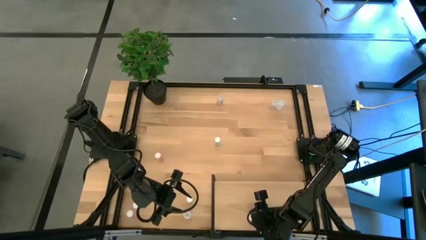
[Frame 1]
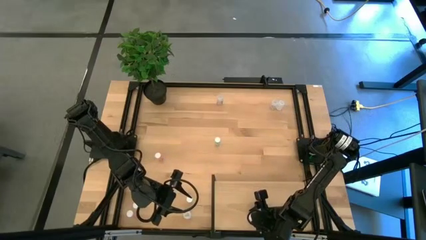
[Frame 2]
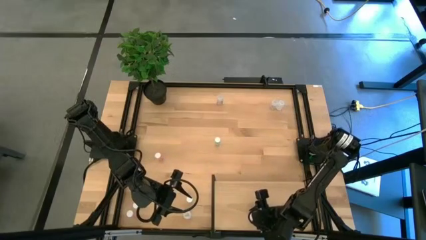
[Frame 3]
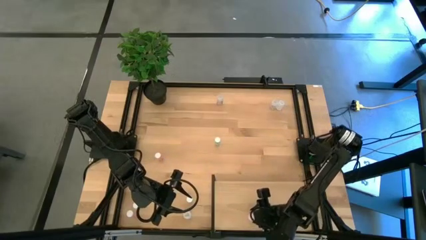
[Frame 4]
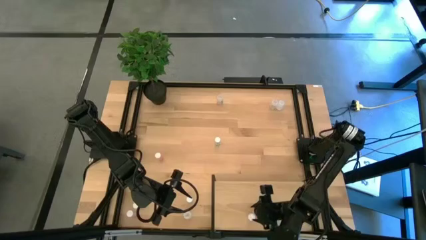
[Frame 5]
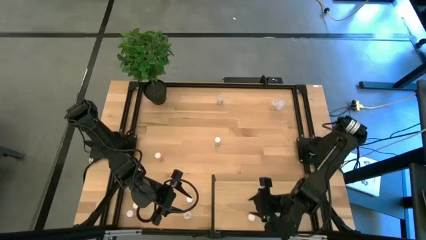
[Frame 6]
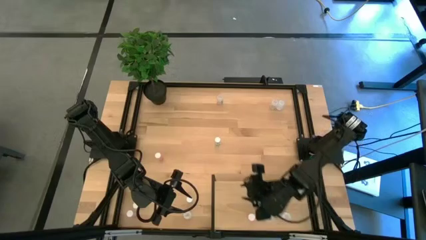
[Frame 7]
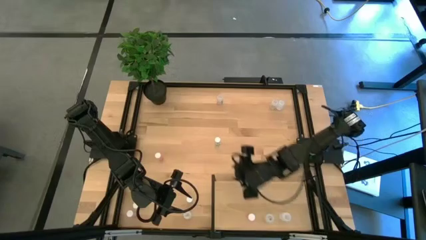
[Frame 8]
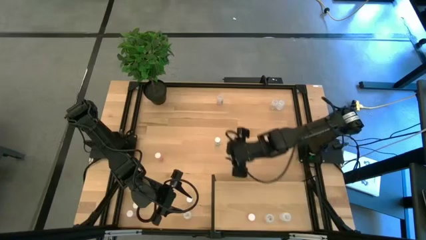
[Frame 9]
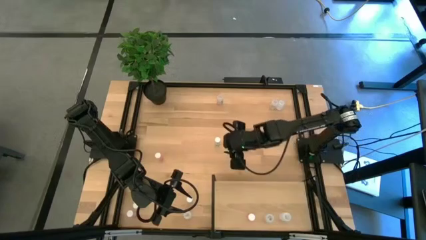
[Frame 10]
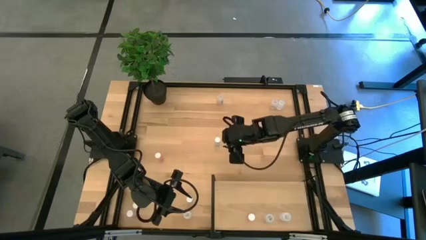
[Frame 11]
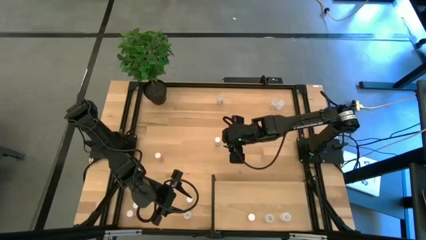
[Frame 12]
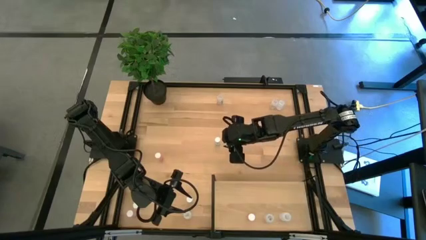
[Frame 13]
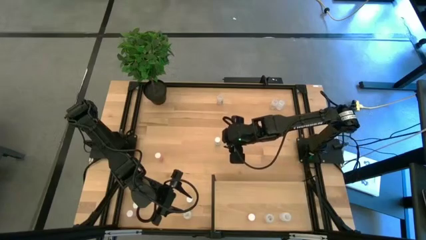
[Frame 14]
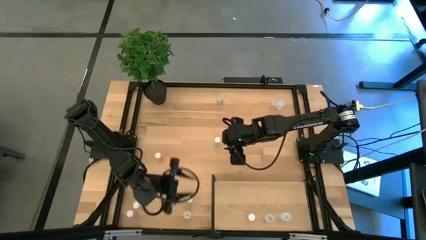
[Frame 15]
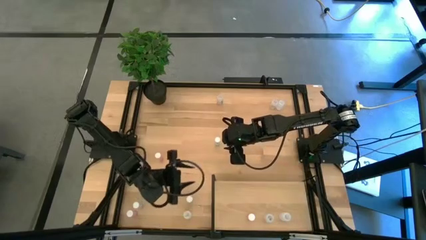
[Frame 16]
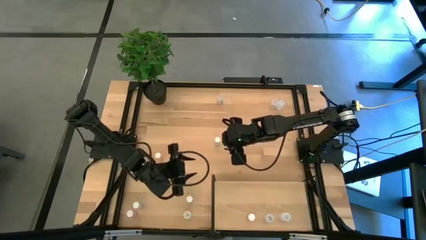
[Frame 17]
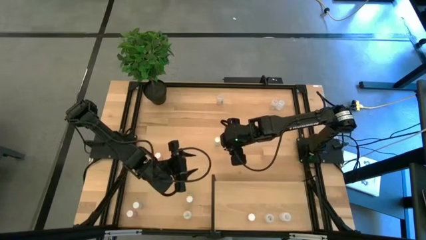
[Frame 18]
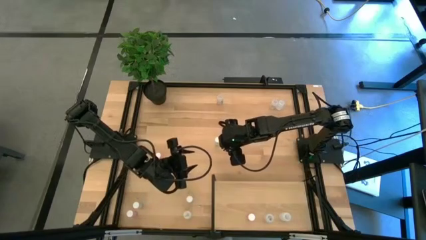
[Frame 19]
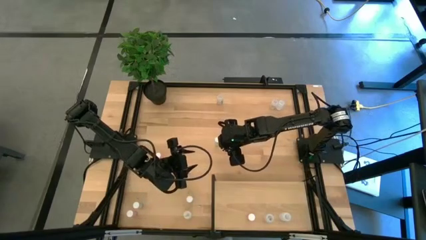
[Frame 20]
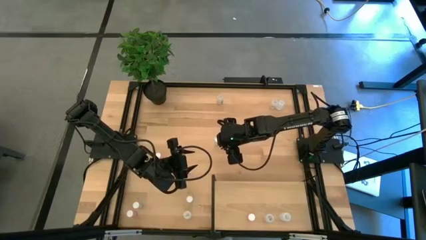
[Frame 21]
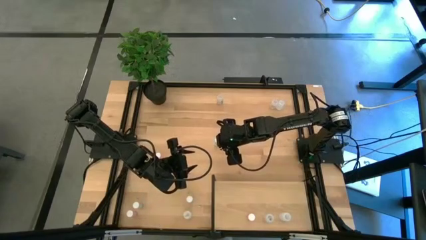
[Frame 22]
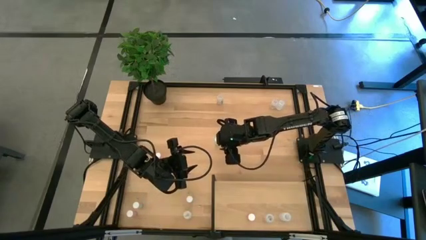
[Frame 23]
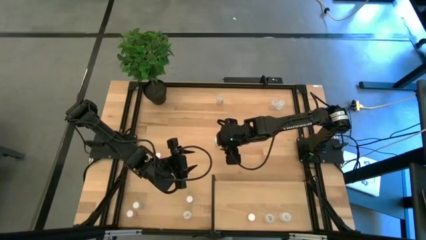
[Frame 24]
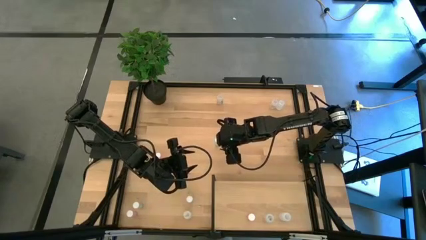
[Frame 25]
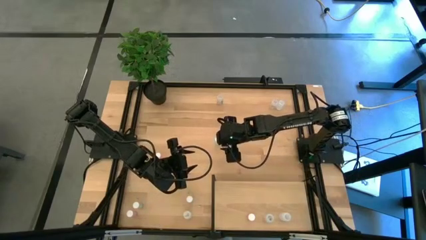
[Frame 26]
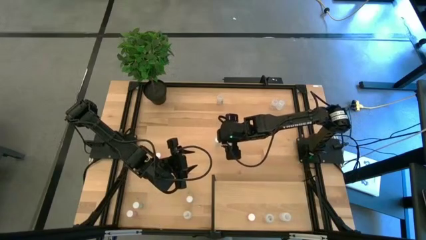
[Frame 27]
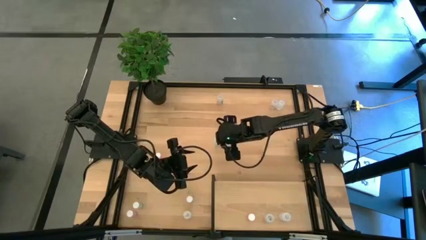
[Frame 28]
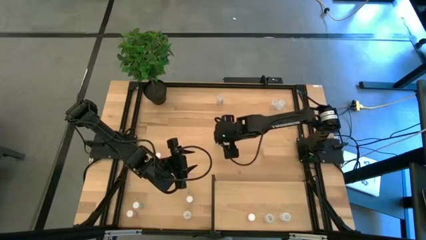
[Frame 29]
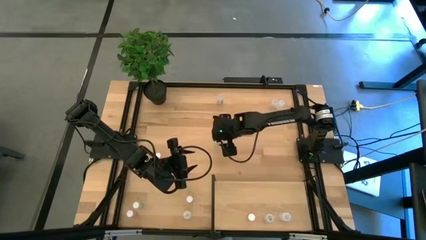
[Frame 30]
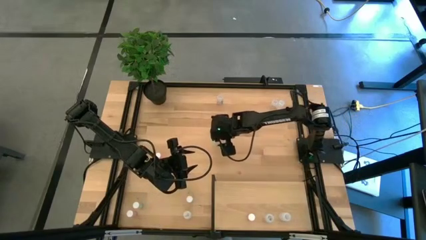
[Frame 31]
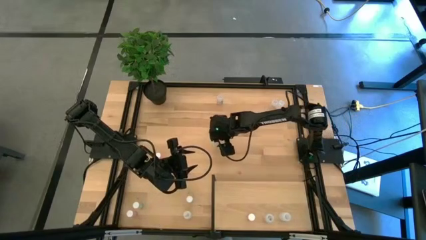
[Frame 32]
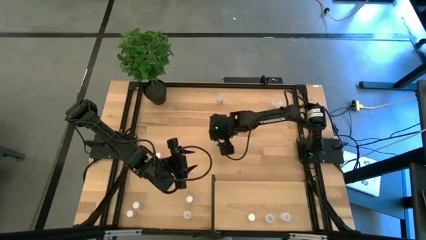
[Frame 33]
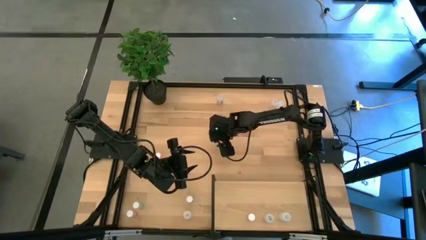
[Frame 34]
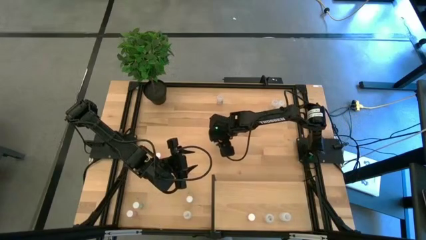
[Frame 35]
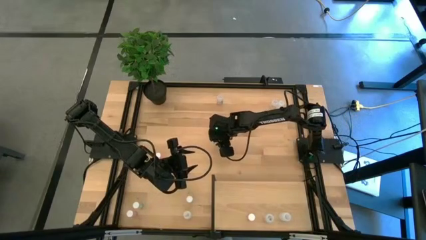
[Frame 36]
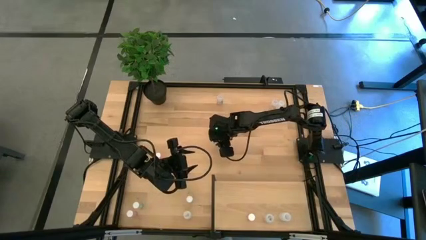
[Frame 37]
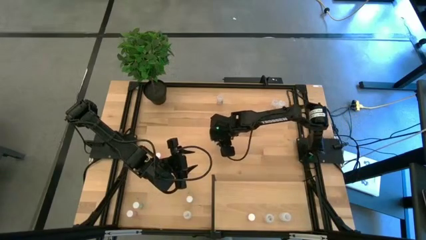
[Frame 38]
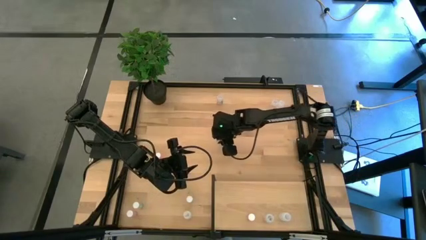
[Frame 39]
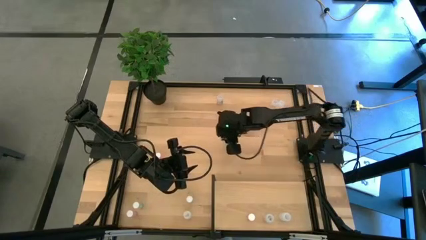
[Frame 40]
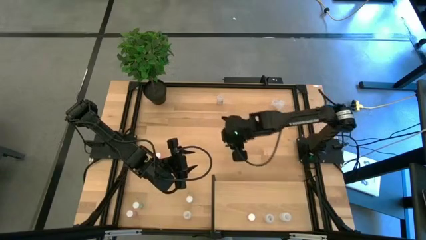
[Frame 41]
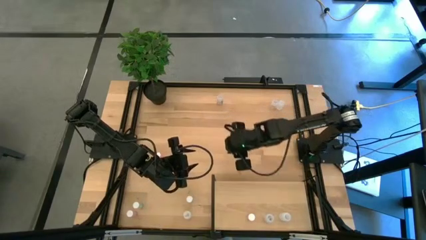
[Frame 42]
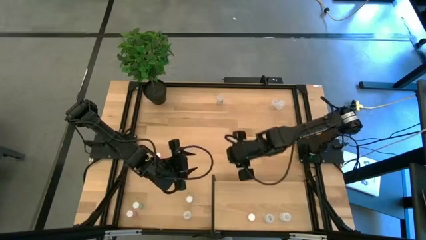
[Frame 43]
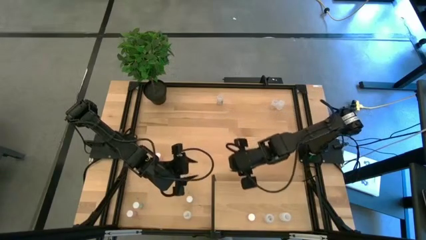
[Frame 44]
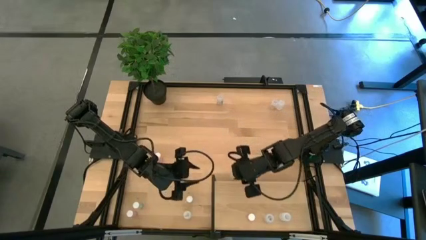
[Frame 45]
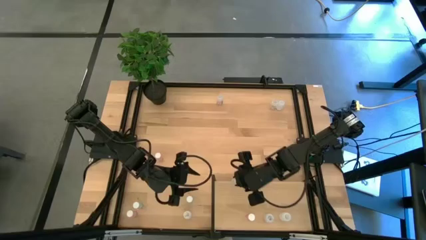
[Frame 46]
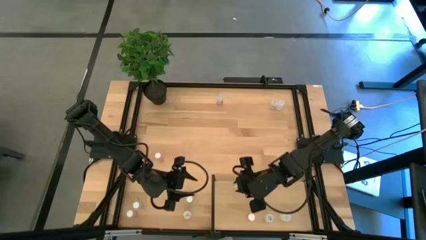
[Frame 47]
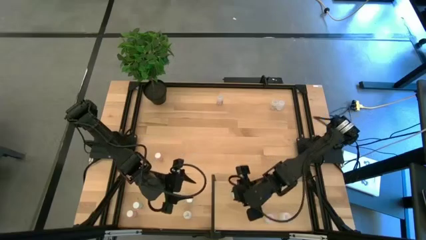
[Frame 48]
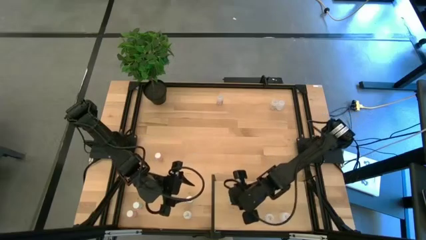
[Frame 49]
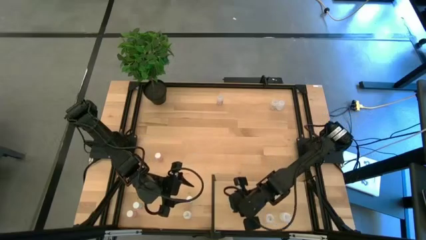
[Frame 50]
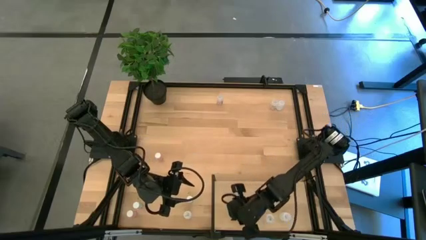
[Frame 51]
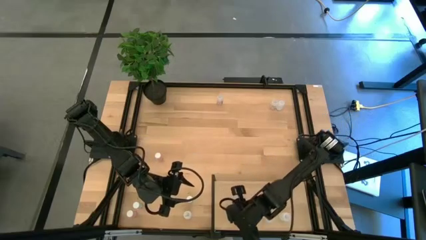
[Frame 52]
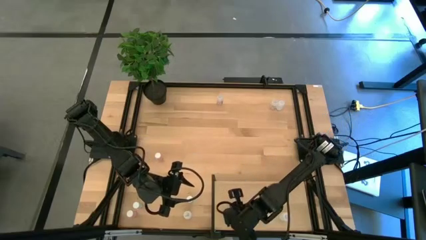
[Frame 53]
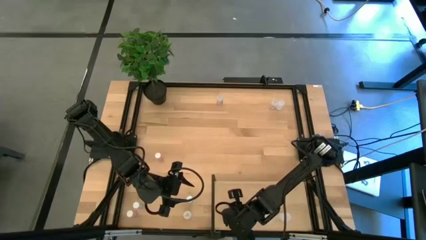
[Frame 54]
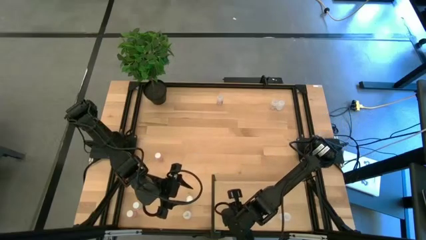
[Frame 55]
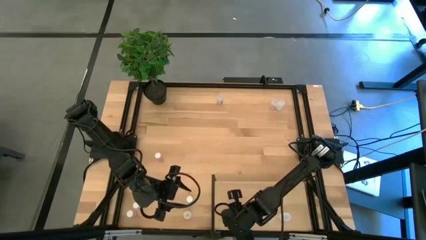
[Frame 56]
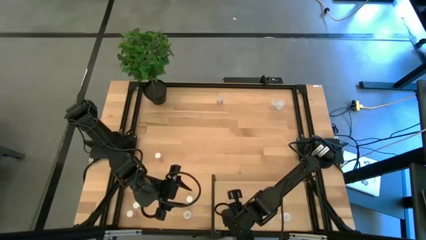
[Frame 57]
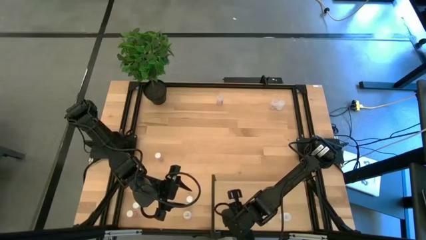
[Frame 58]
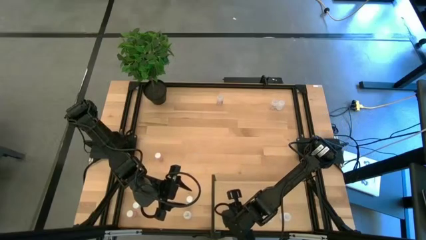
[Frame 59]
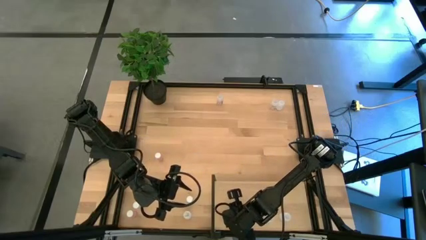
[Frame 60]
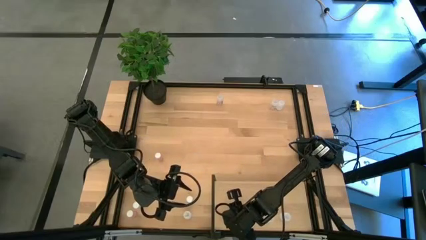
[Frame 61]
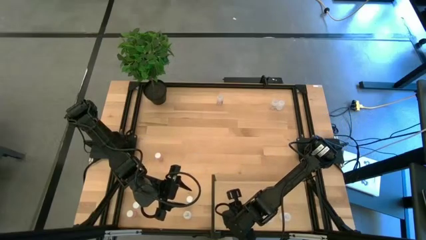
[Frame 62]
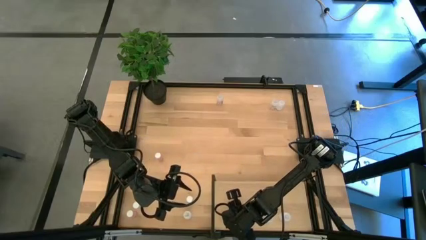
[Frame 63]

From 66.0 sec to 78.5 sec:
Task: Pick and place medicine bottles onto shelf by color
Put the top green pill bottle on the shelf
